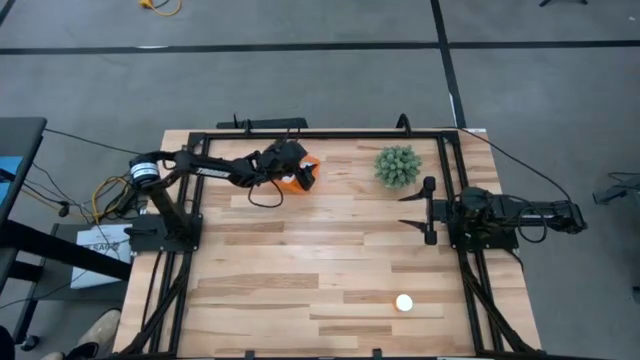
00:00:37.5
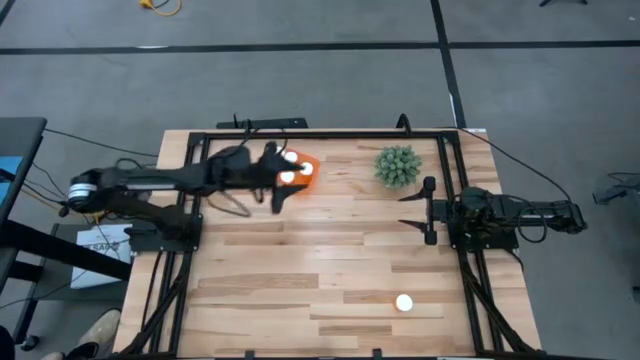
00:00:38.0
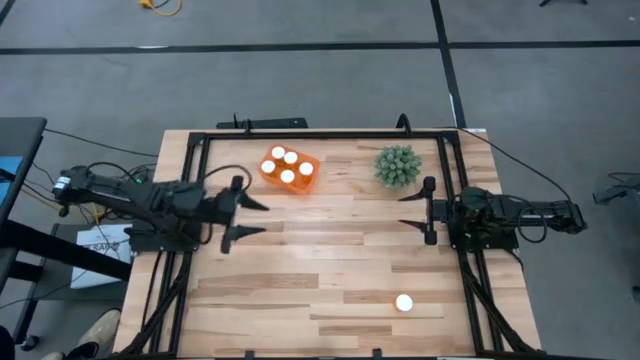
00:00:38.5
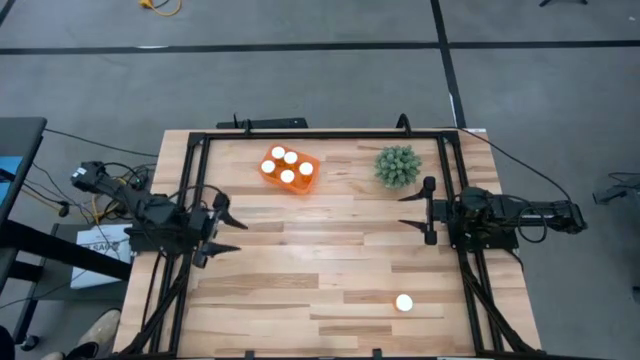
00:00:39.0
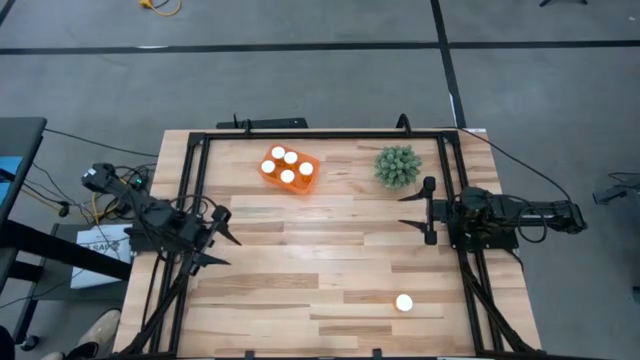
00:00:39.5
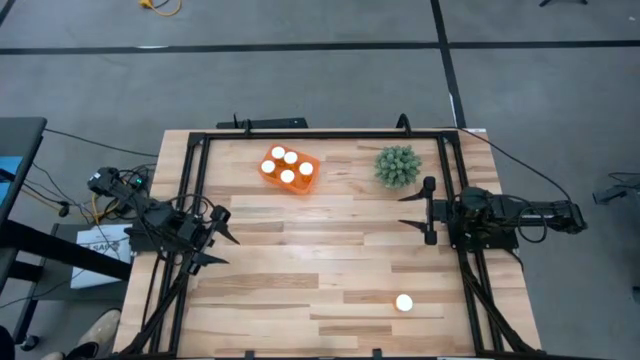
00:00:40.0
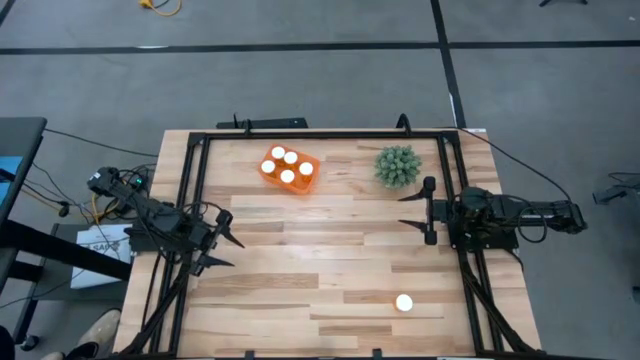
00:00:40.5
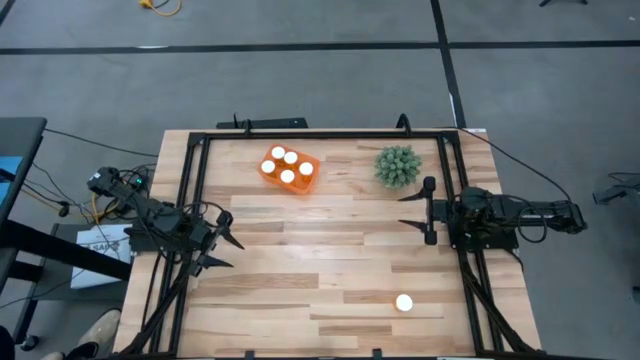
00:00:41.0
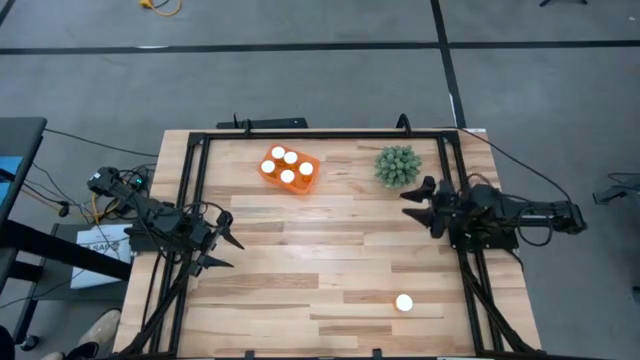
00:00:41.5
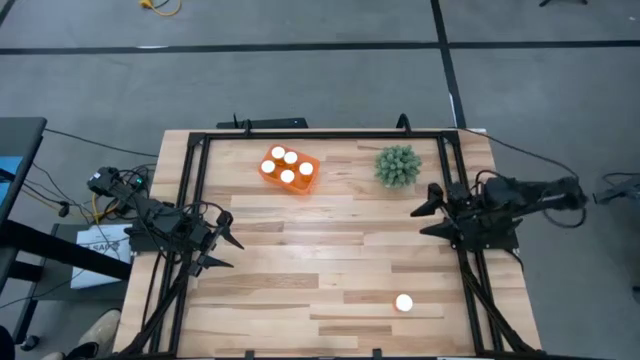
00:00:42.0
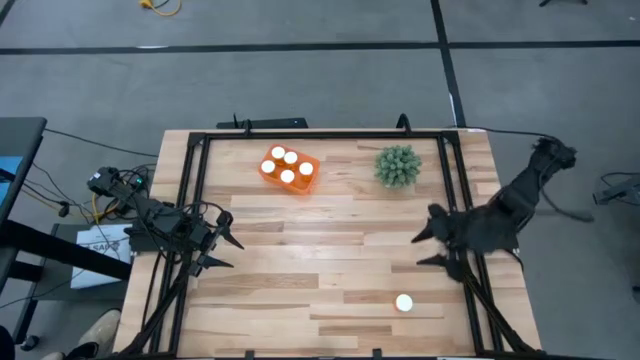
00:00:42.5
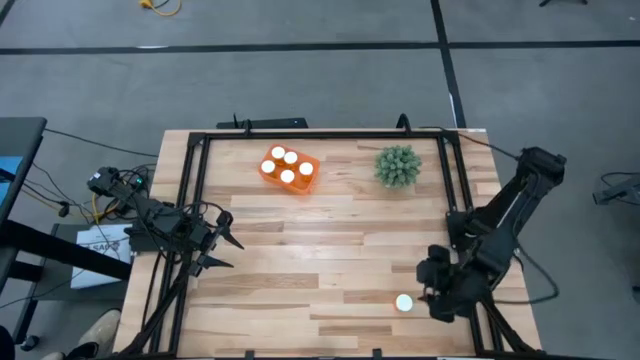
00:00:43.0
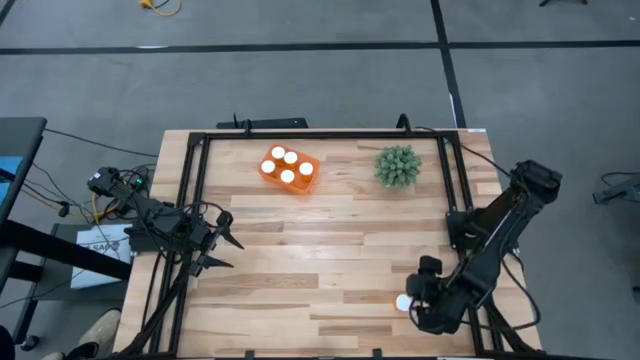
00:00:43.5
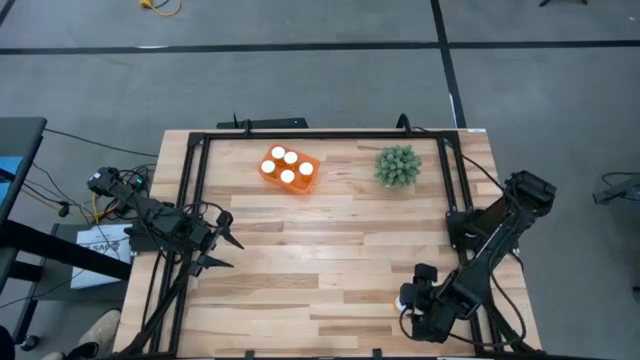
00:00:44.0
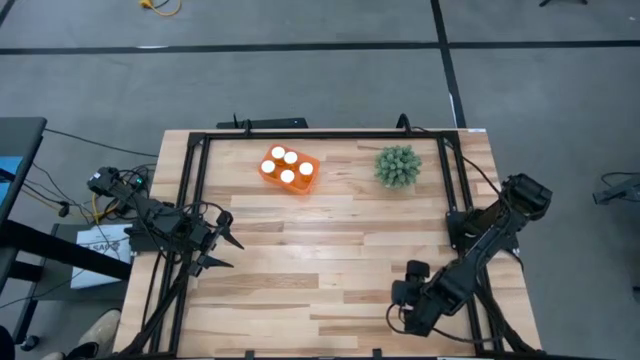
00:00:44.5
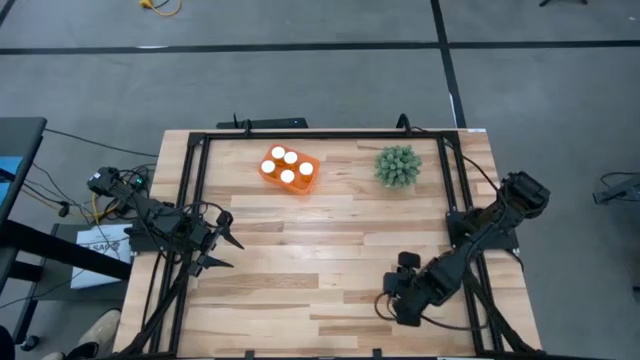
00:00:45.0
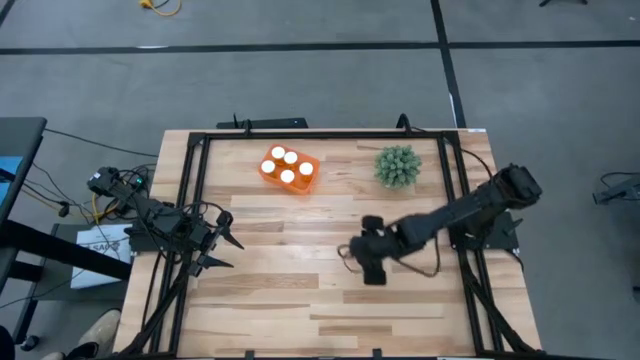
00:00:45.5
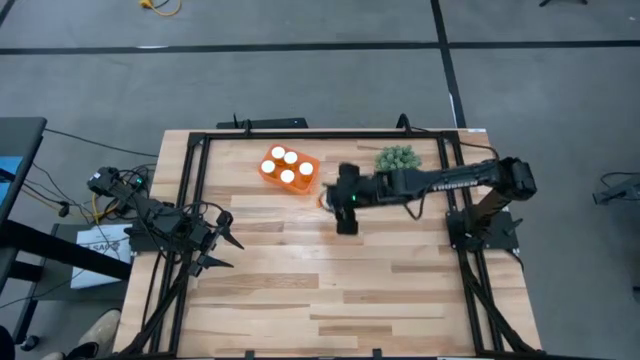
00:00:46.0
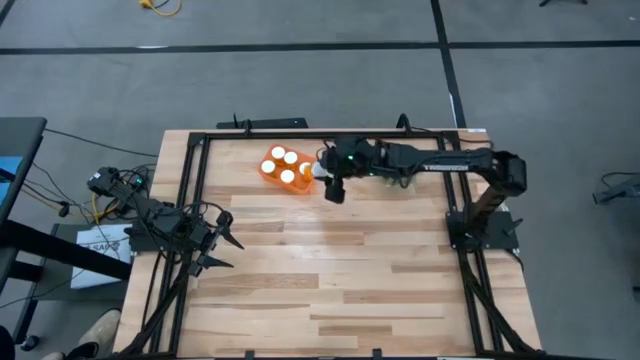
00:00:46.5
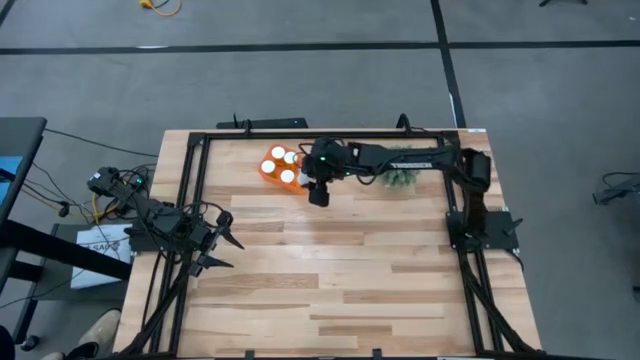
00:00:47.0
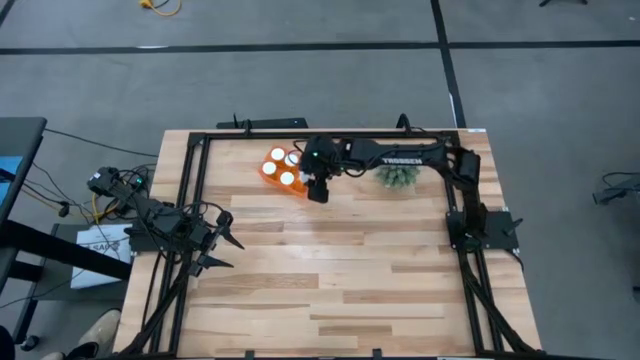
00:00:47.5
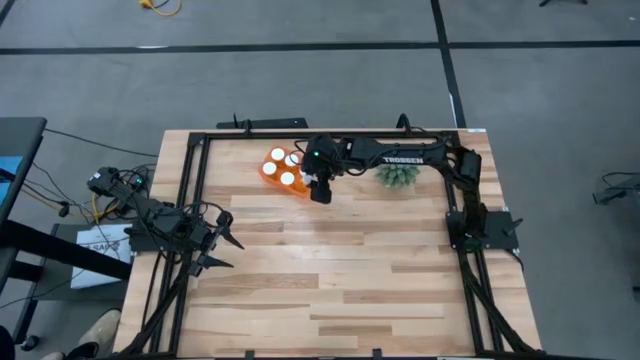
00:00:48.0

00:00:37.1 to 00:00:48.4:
Task: Pick and place pill bottles into a basket
Put the orange pill bottle into the orange bin

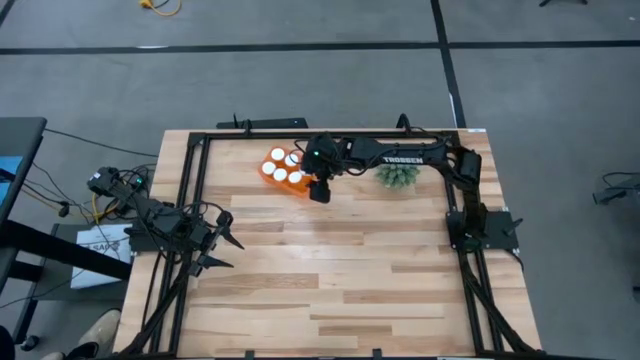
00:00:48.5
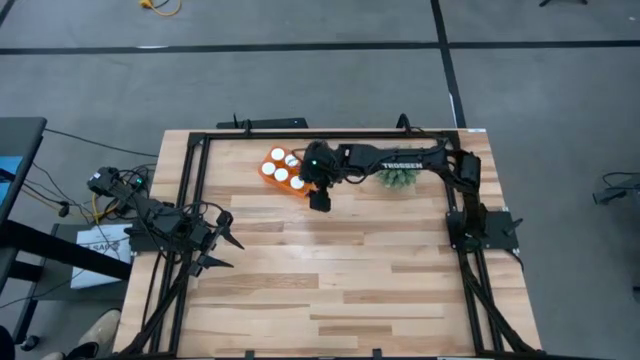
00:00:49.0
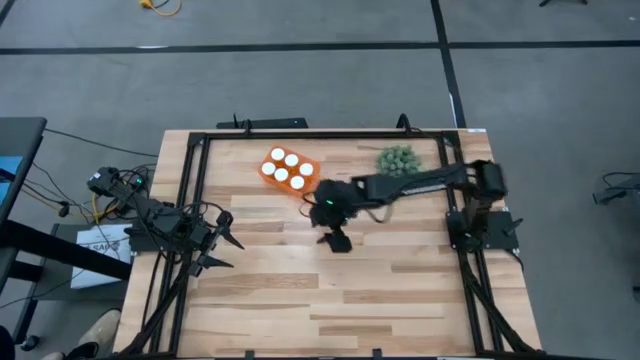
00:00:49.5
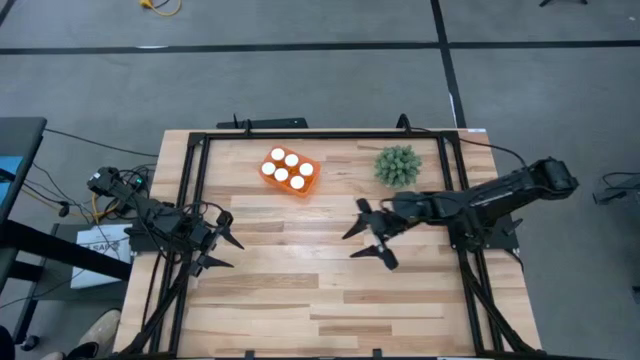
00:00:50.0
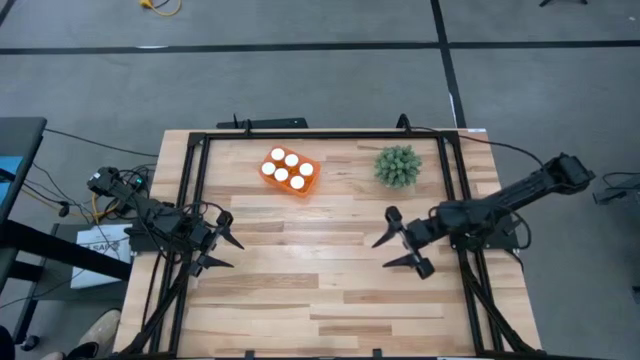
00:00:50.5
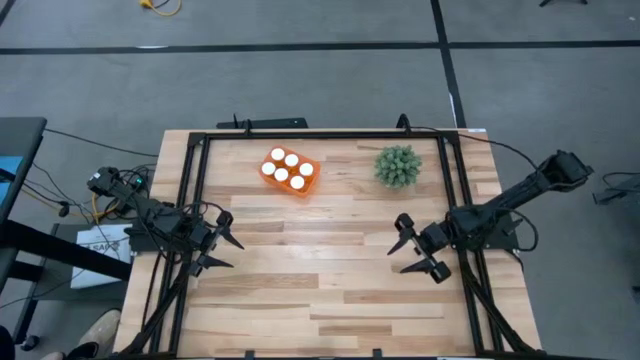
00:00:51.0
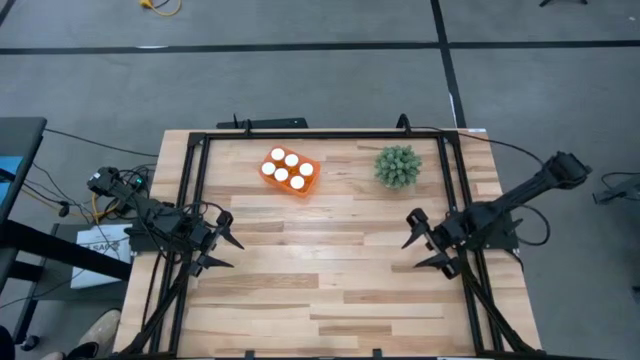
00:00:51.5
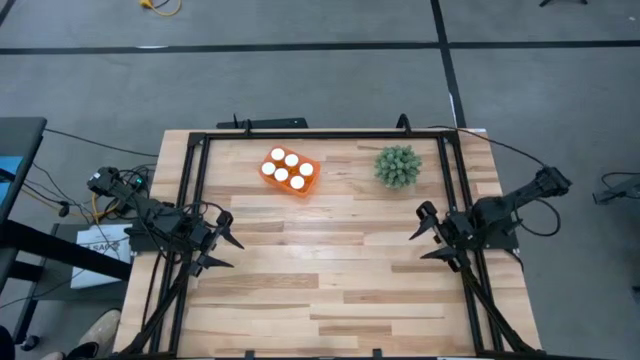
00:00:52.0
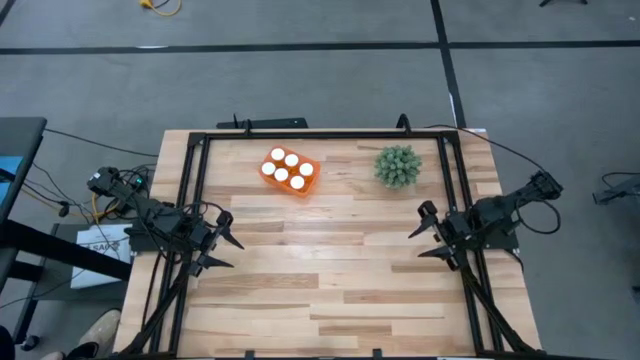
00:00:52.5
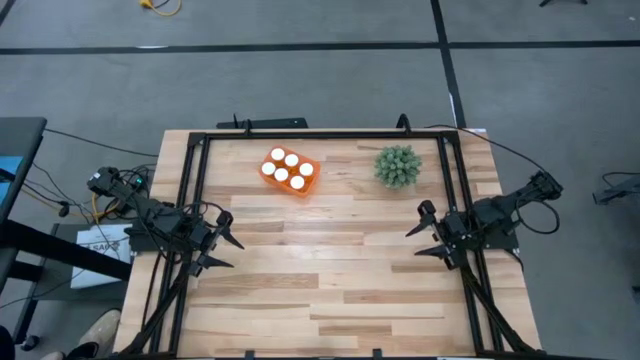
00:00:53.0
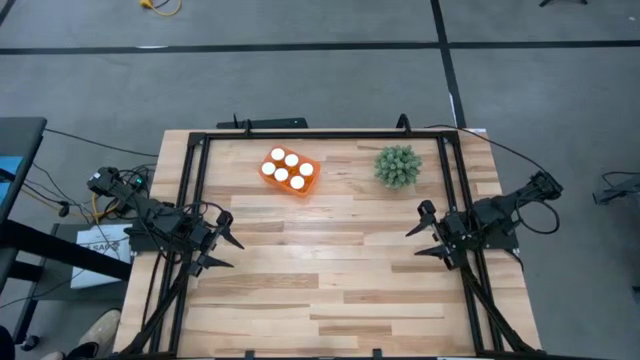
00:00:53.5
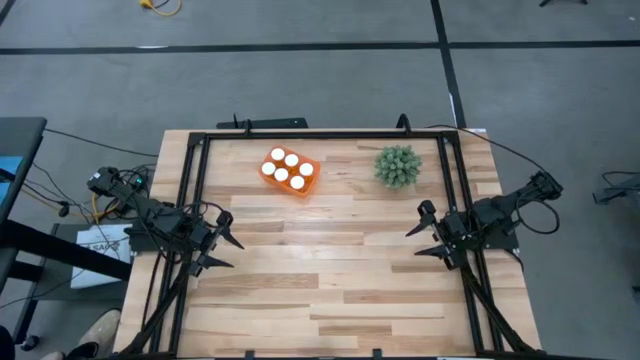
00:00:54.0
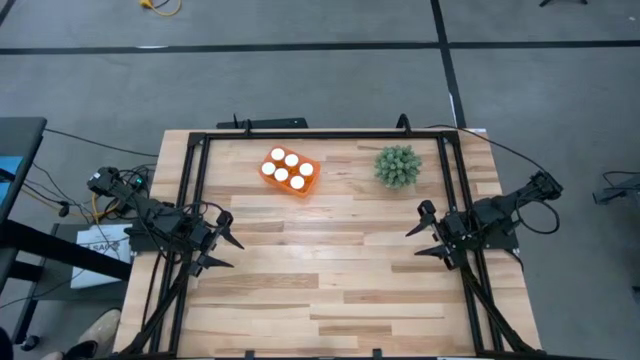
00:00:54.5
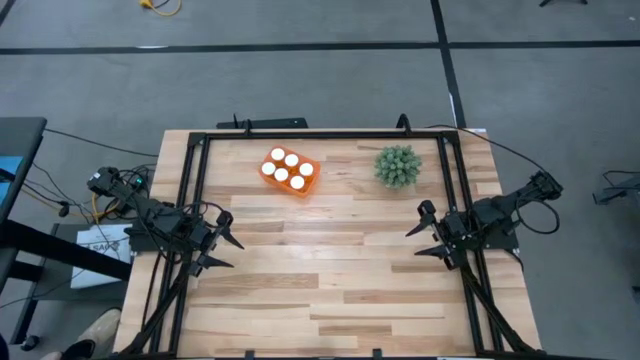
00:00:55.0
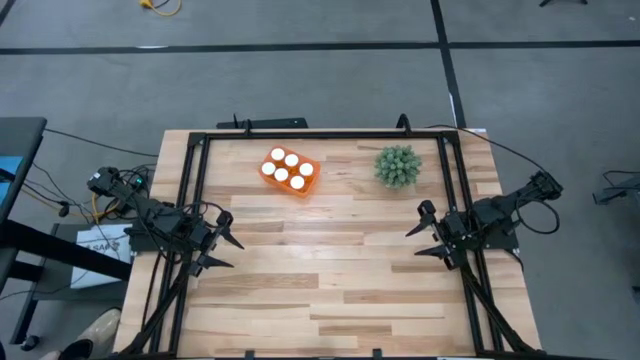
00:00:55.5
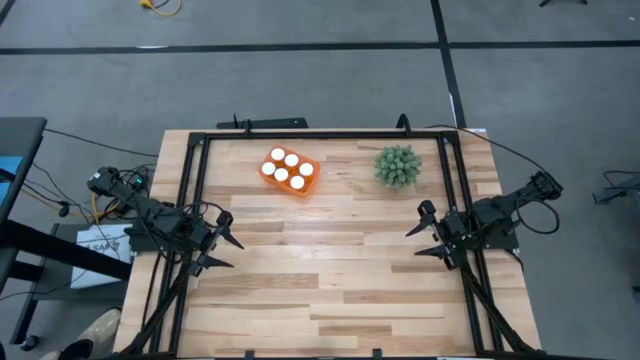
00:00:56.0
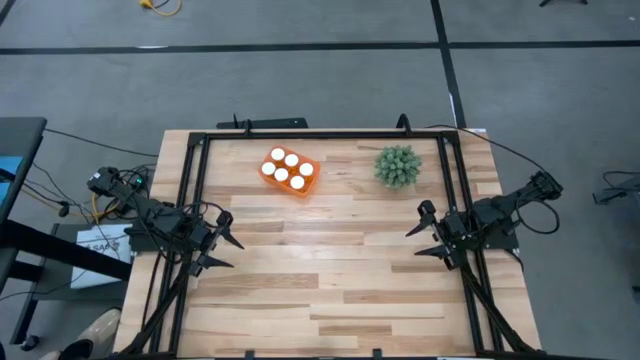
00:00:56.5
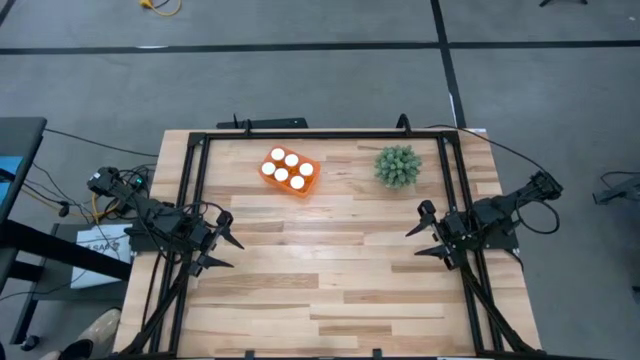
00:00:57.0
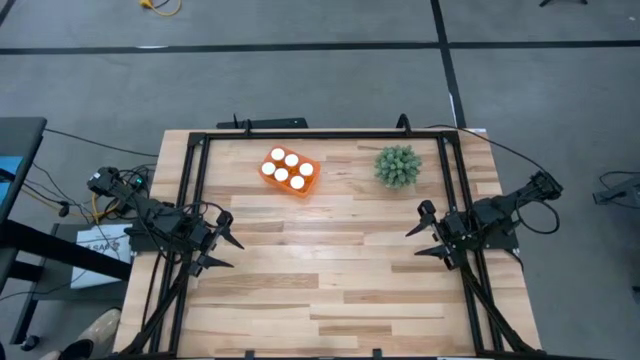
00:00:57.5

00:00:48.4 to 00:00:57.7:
Return to Home Position
